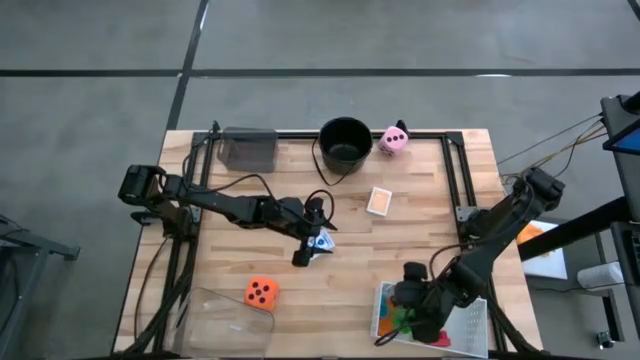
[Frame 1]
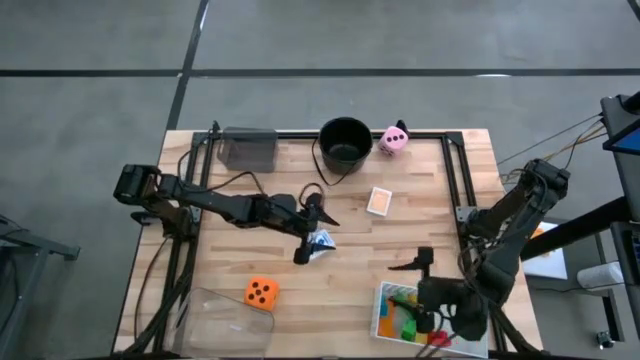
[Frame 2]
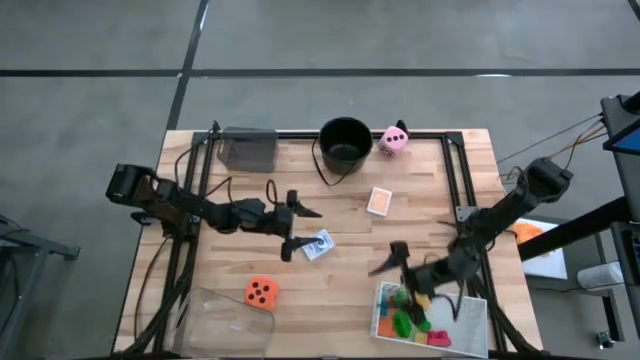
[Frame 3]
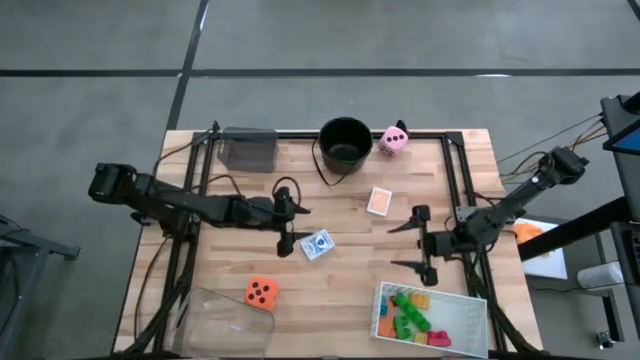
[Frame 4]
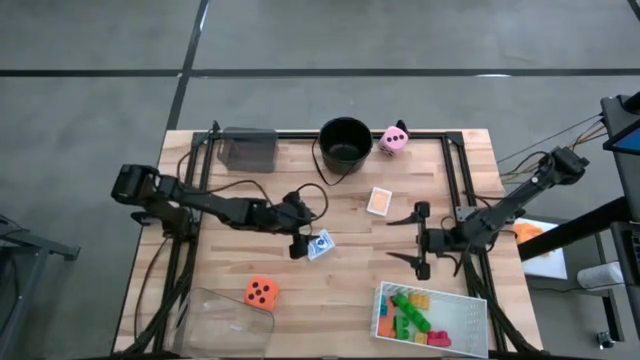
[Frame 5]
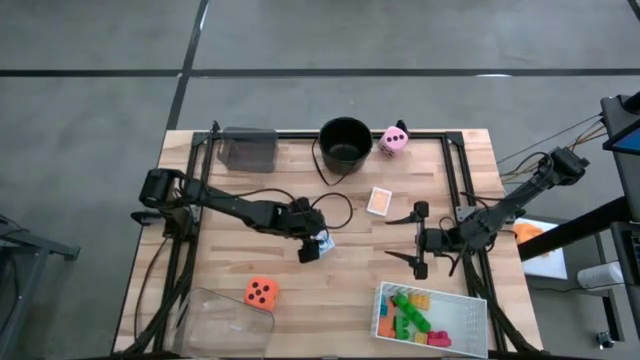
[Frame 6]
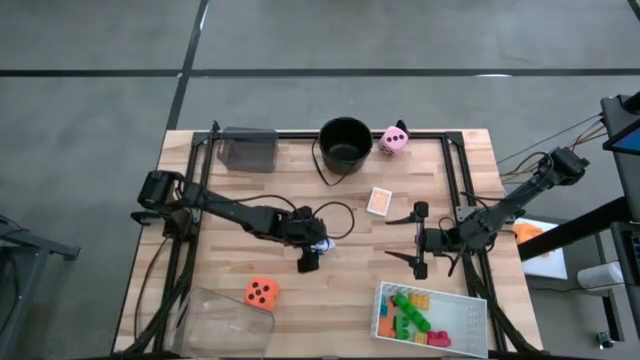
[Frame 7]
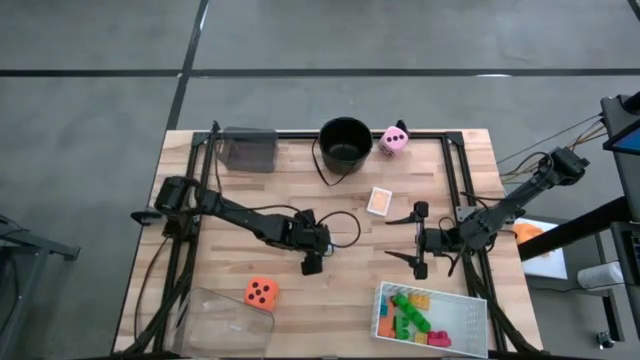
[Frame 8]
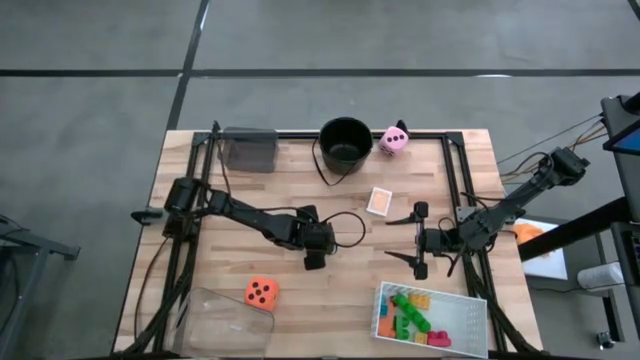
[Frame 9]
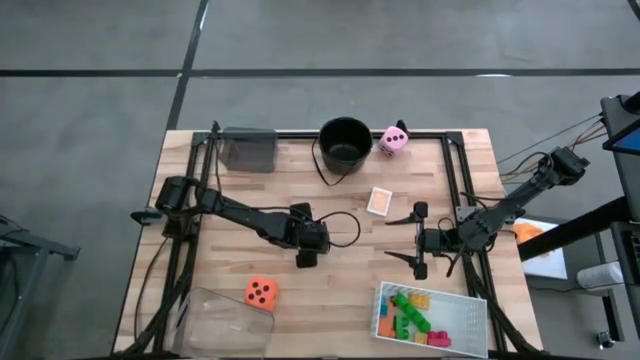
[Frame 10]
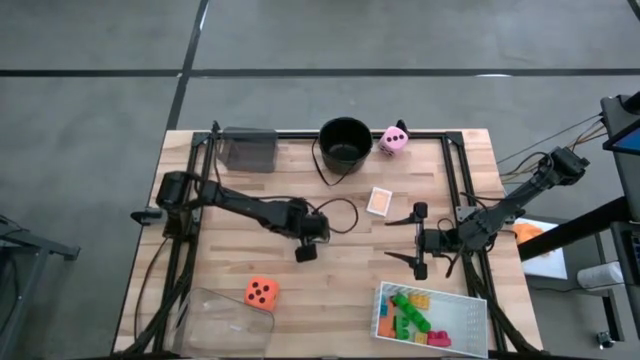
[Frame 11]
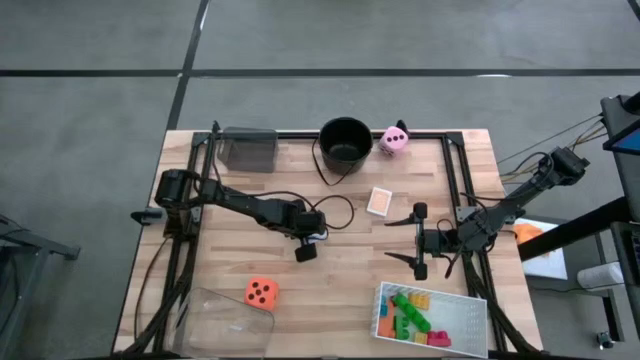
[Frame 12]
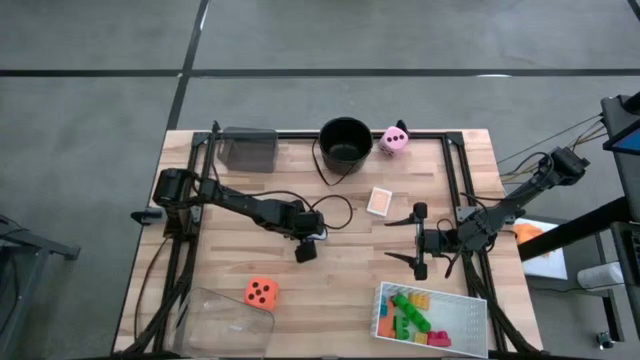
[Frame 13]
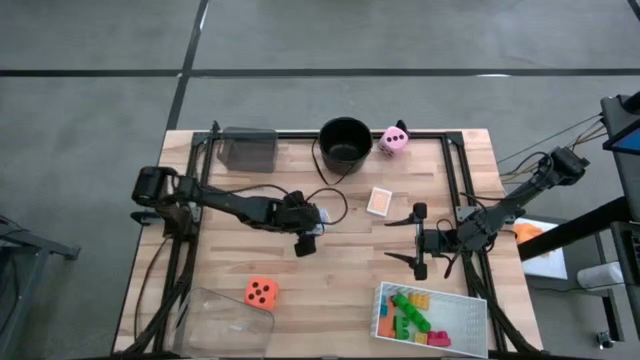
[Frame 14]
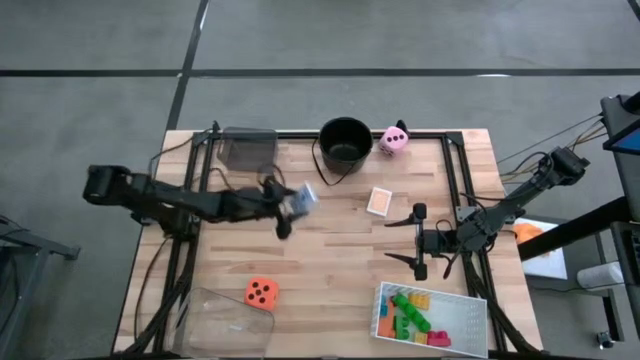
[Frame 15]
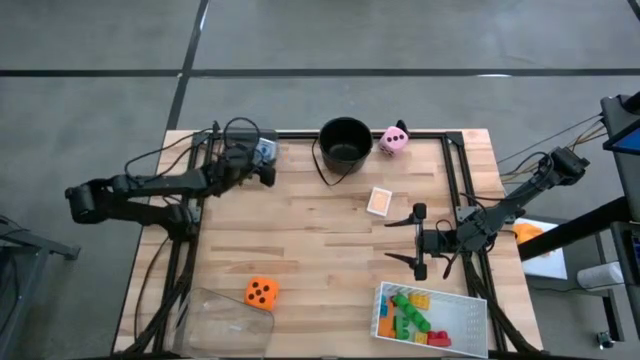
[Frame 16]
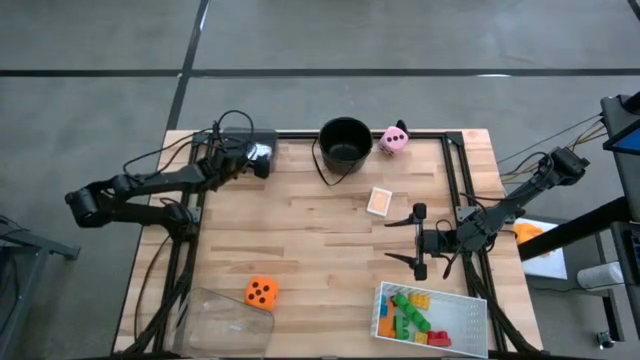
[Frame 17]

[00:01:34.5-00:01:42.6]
Task: Pick & Place Toys
Put the blue deck of cards into the black bin

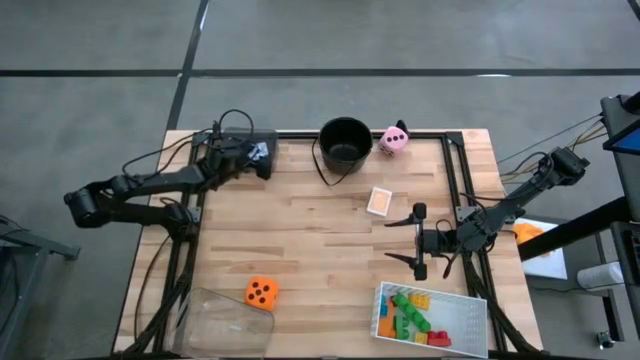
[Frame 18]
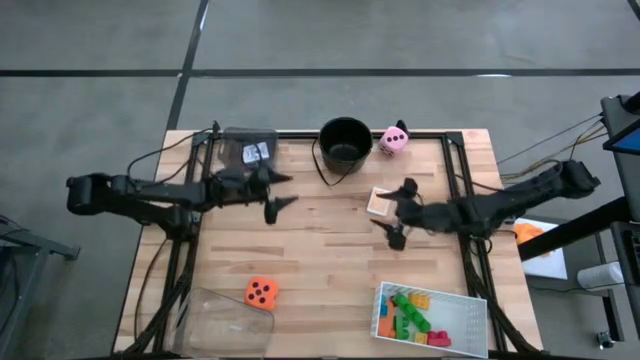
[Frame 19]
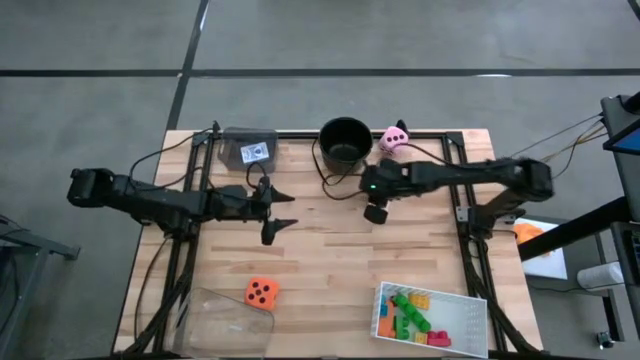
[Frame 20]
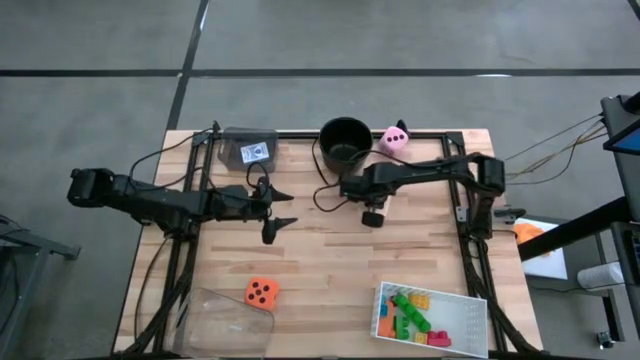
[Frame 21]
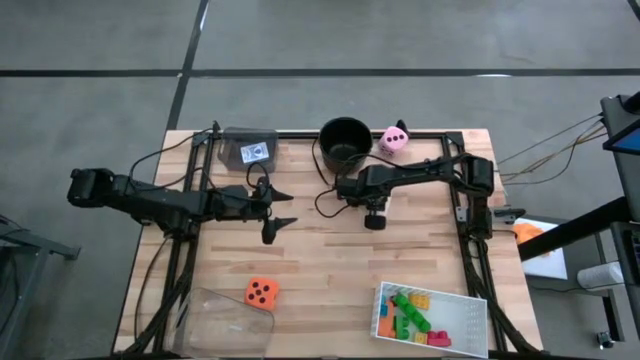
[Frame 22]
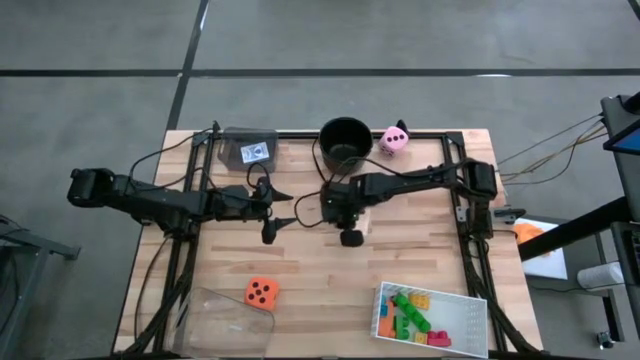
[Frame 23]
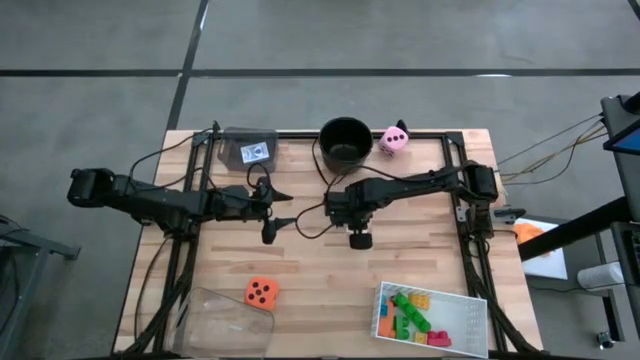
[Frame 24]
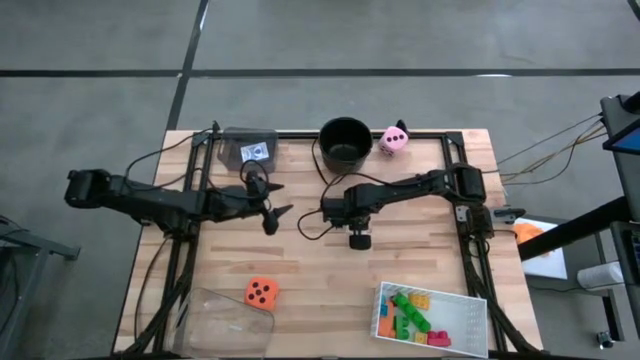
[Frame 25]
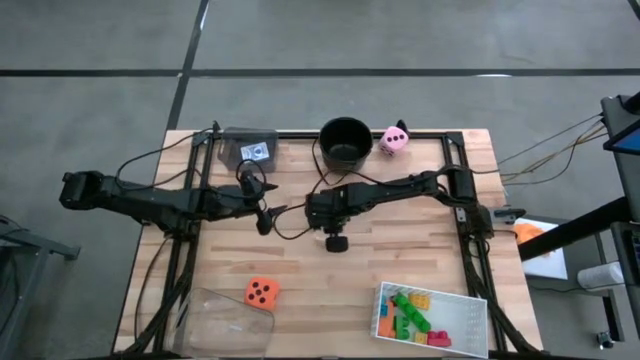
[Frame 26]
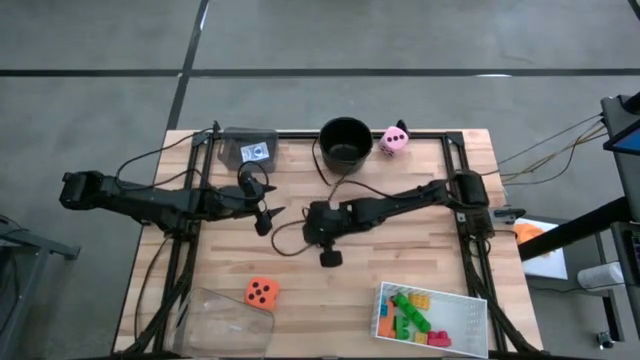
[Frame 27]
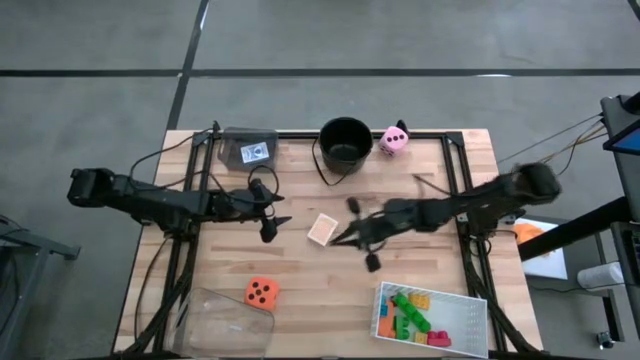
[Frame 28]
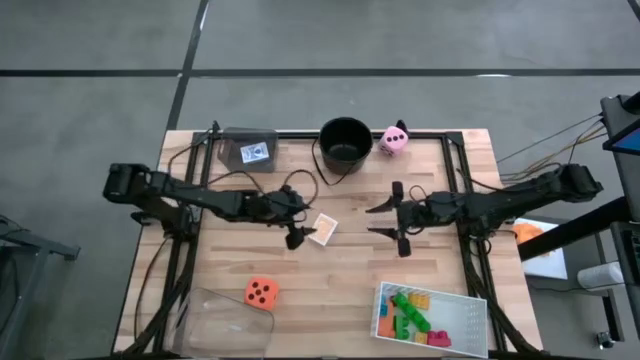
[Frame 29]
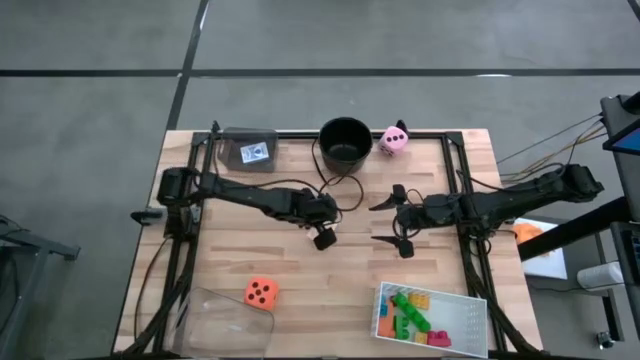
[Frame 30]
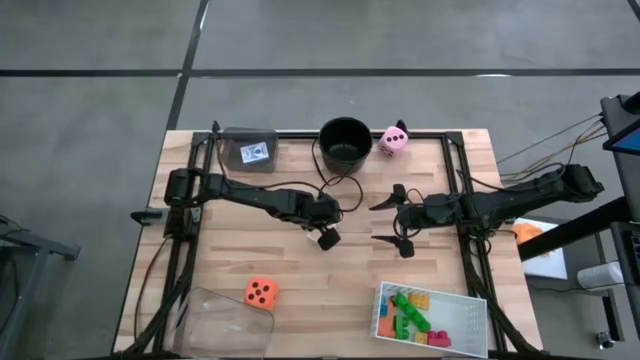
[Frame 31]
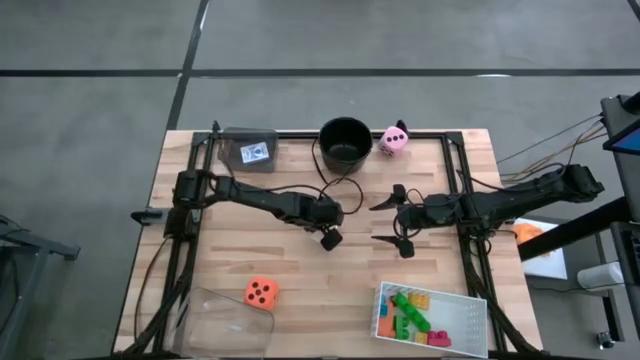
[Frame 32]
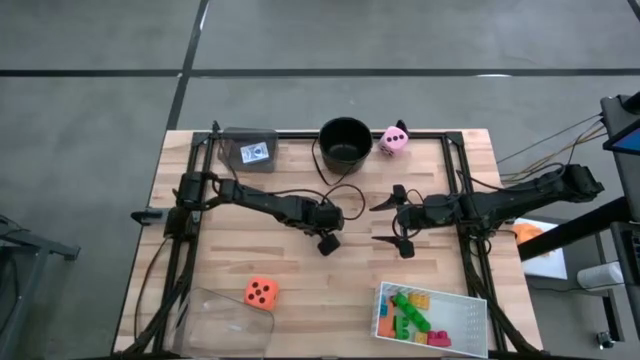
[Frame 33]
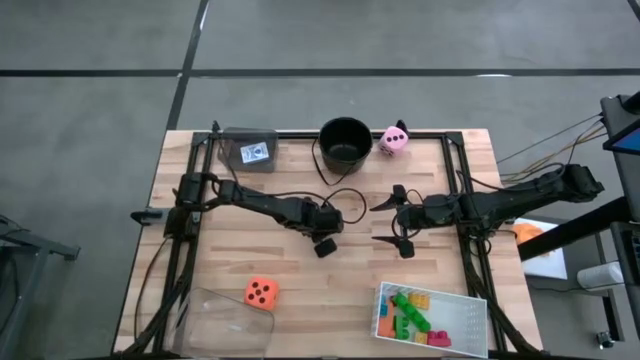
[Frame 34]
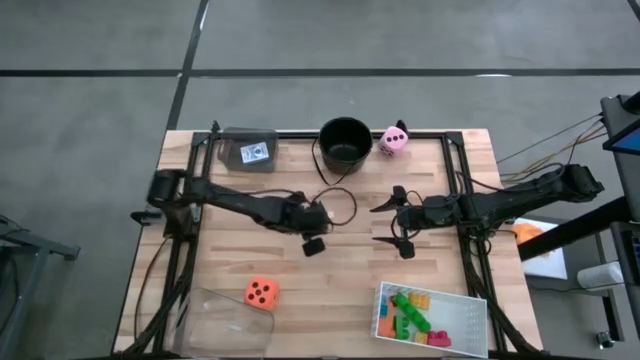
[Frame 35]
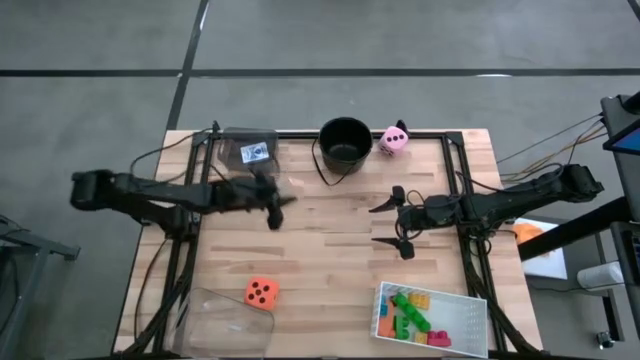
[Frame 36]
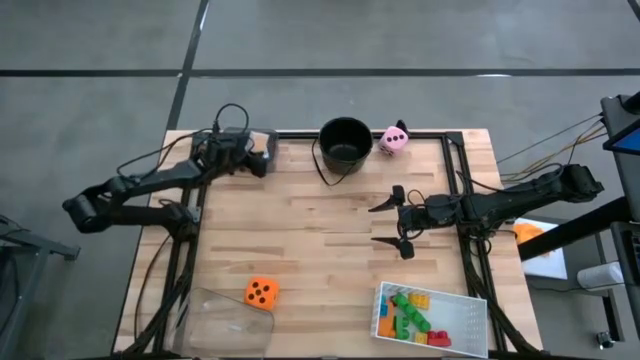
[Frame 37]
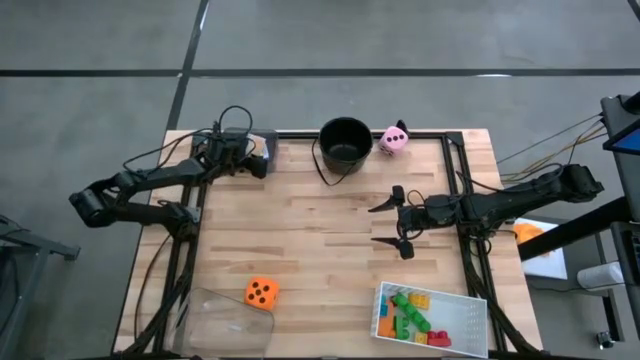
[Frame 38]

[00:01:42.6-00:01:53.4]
Put the yellow deck of cards into the black bin

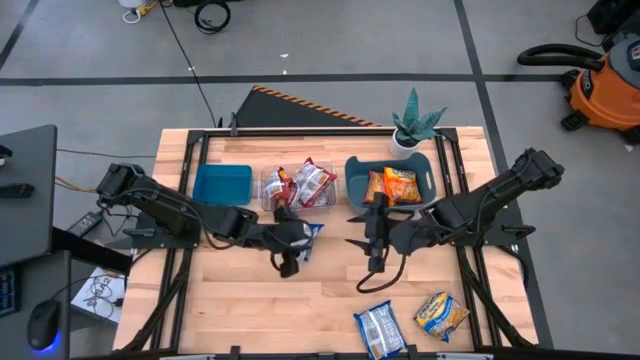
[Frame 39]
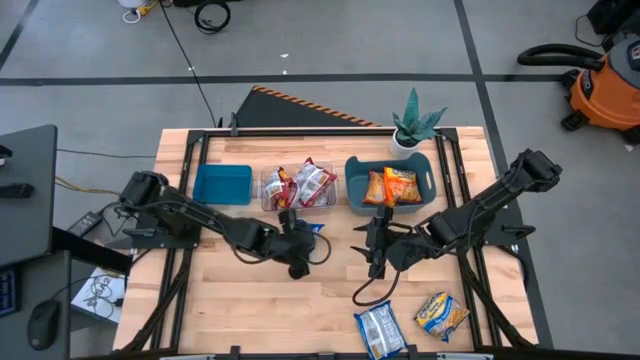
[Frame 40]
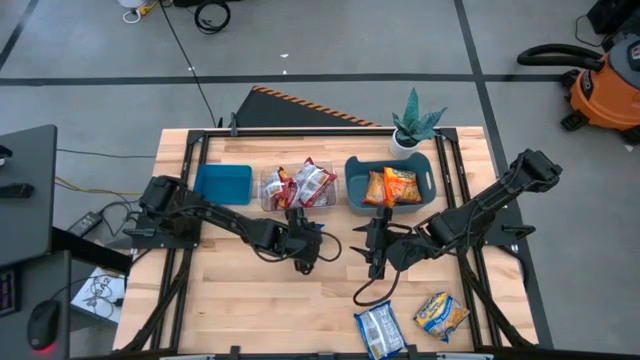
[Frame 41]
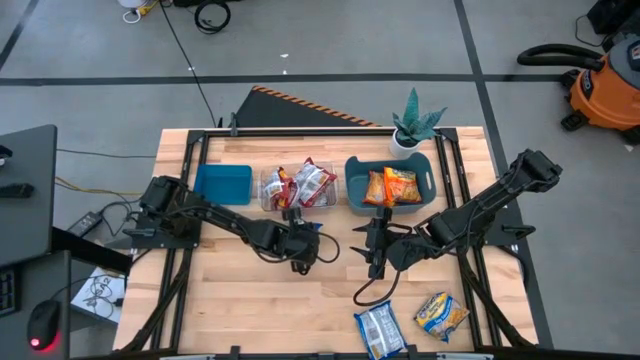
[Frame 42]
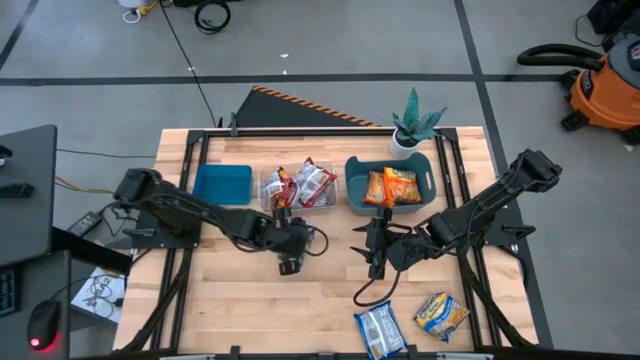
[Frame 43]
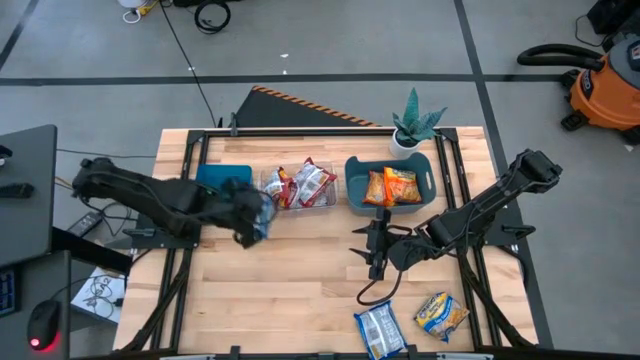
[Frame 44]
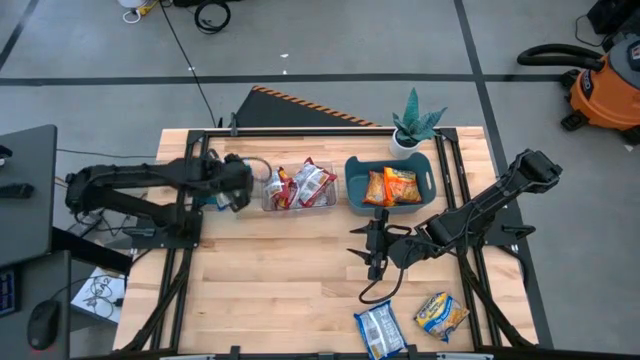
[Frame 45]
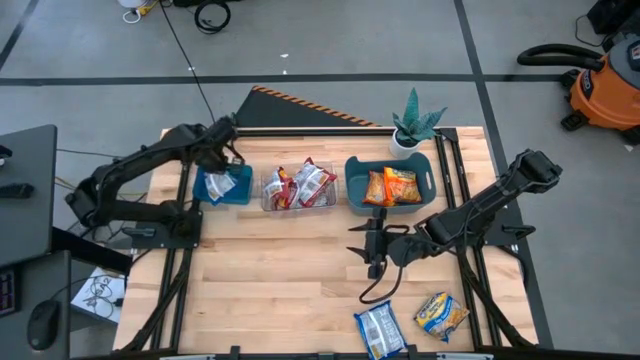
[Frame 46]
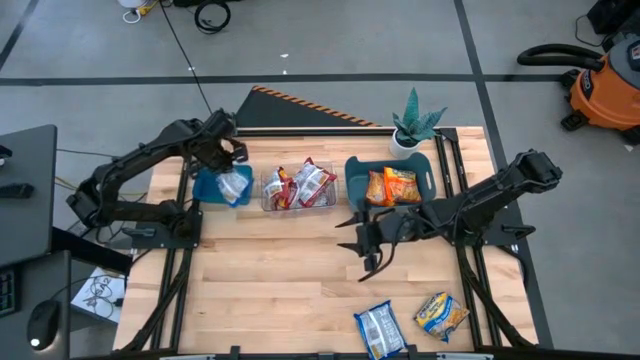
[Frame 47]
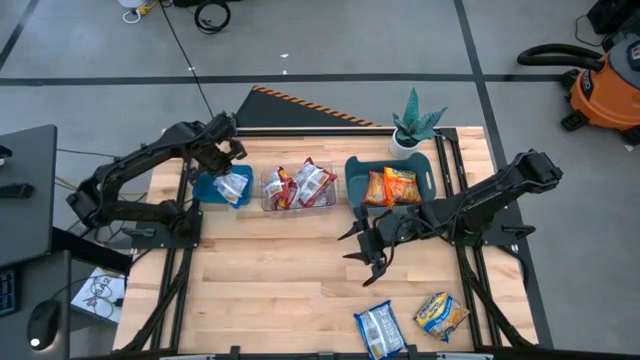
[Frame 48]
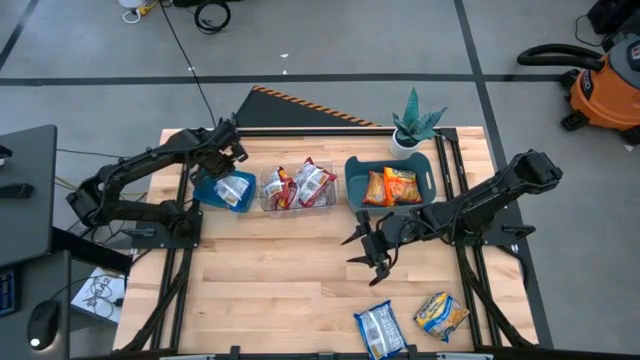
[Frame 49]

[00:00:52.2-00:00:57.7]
Task: Sort Maruchan noodles
Put the blue noodle pack into the blue bin
